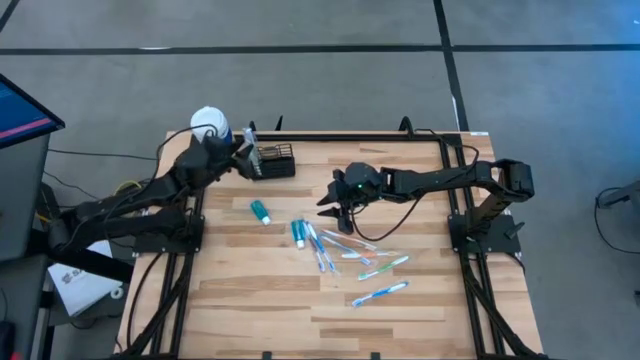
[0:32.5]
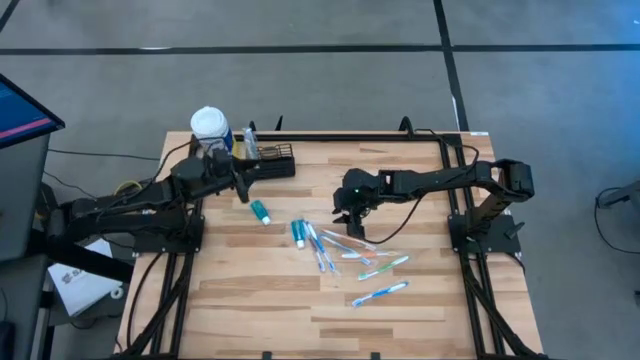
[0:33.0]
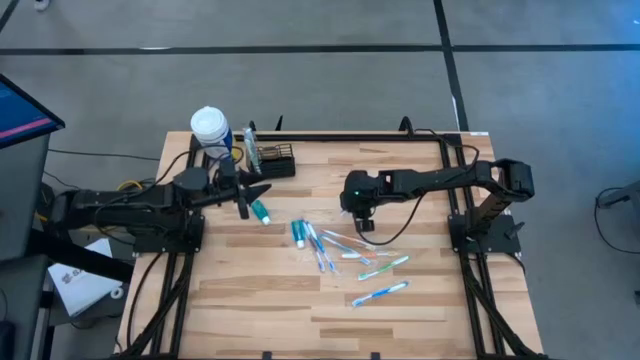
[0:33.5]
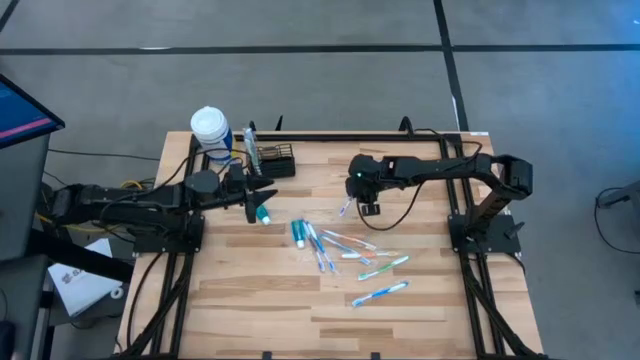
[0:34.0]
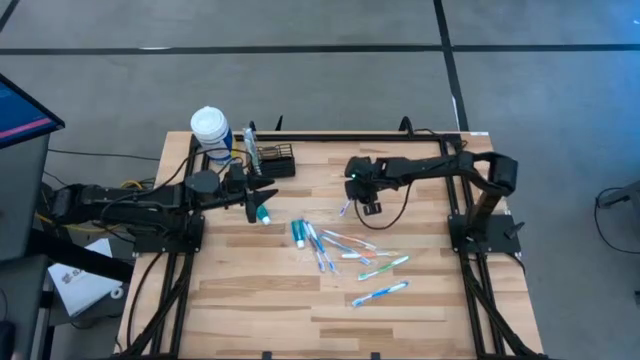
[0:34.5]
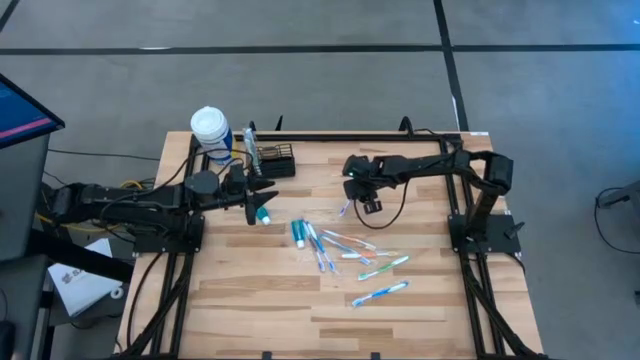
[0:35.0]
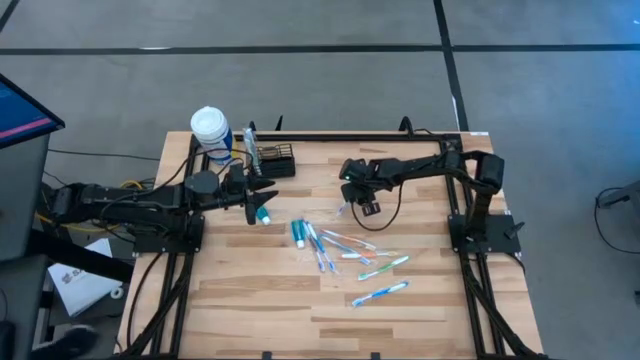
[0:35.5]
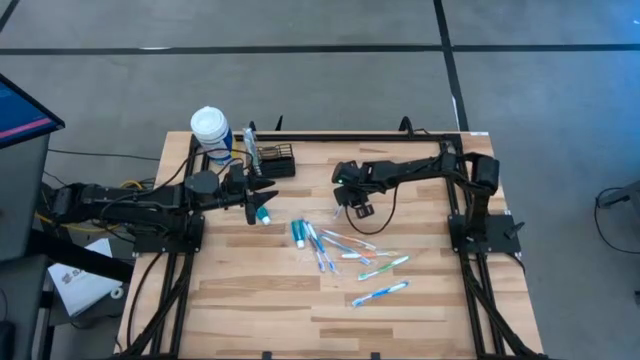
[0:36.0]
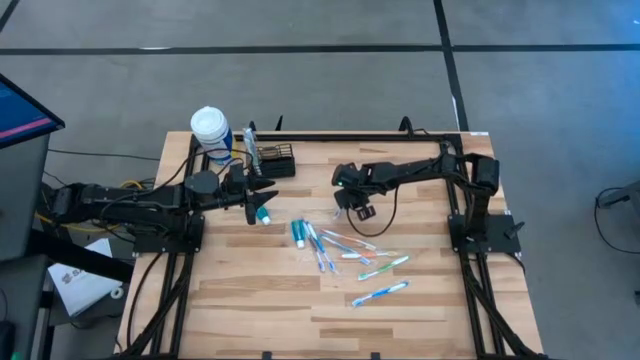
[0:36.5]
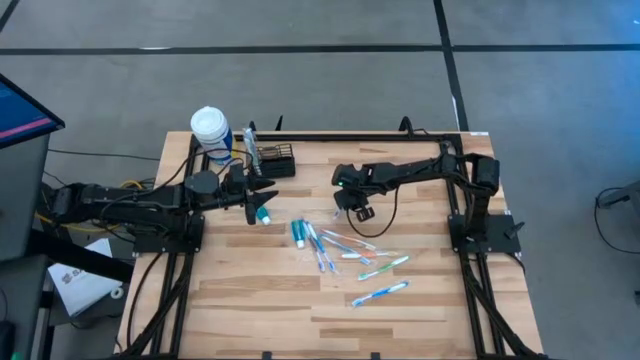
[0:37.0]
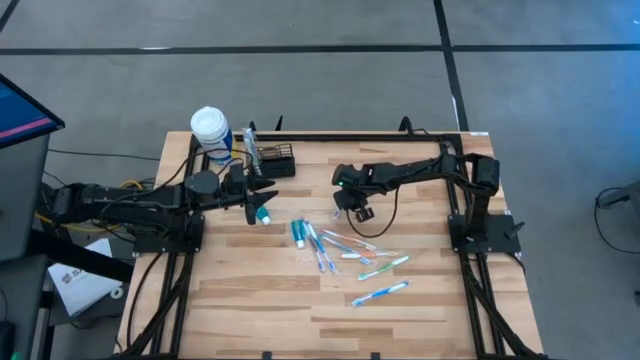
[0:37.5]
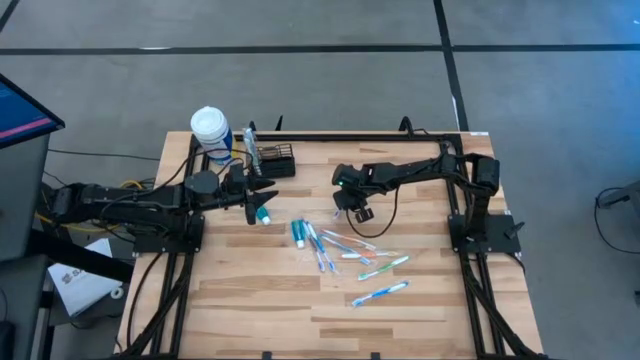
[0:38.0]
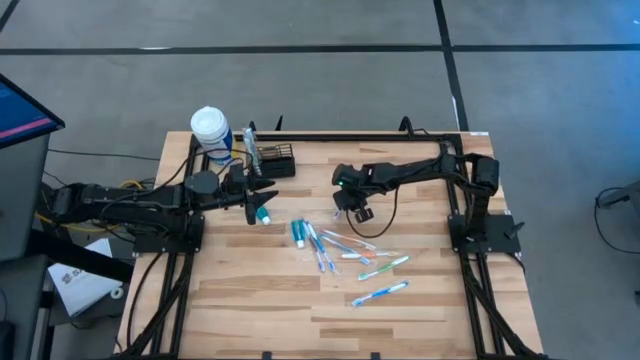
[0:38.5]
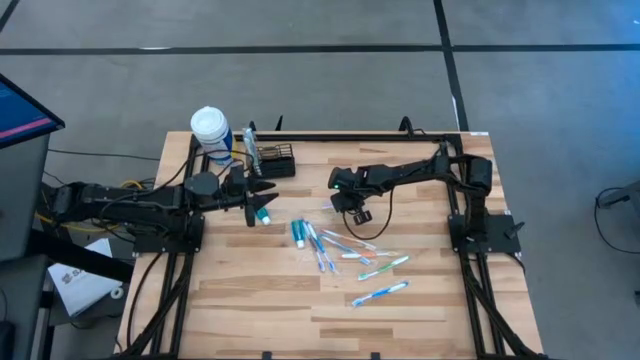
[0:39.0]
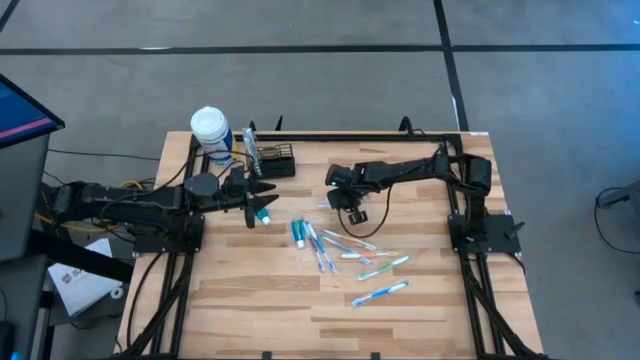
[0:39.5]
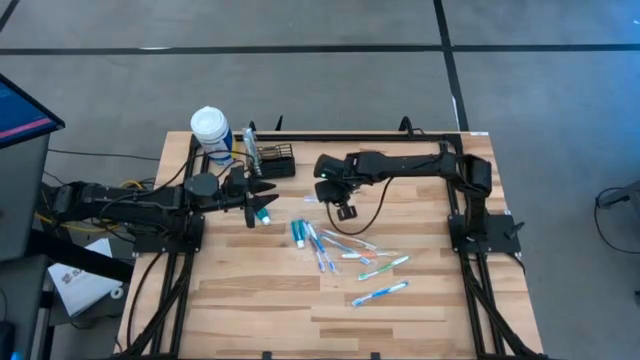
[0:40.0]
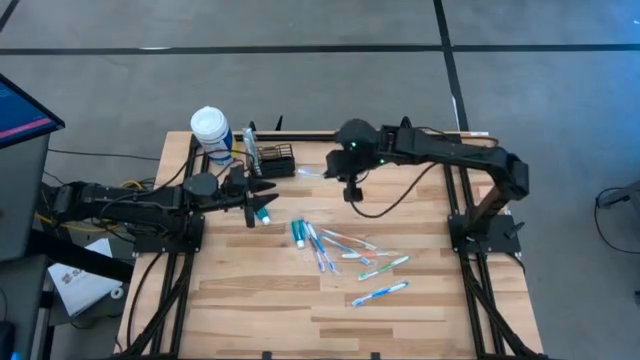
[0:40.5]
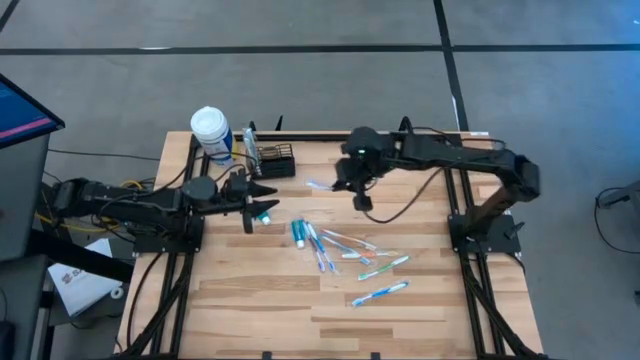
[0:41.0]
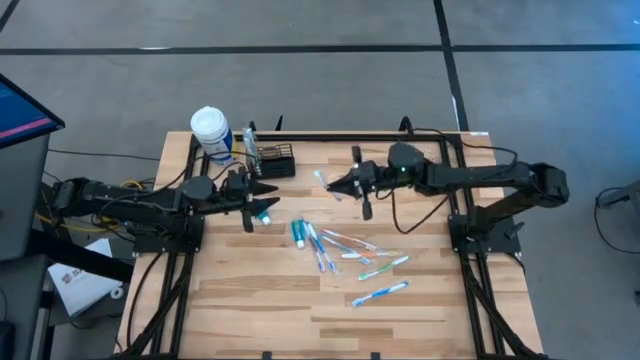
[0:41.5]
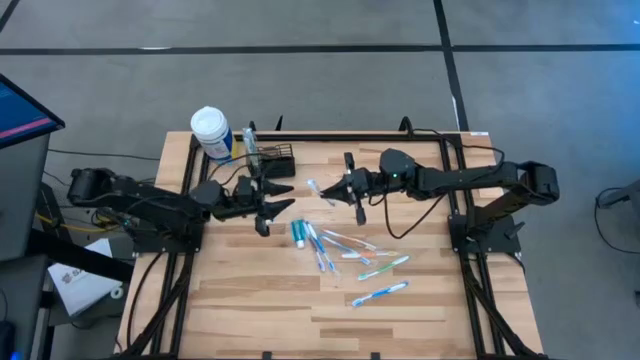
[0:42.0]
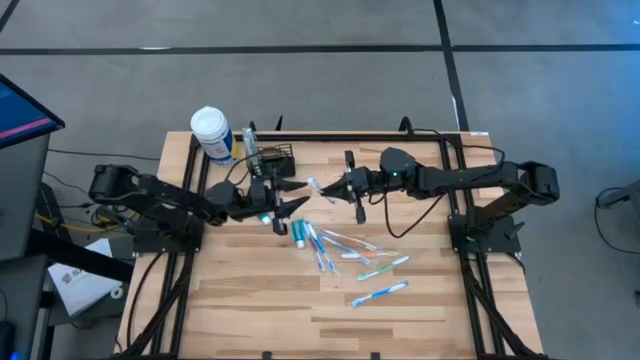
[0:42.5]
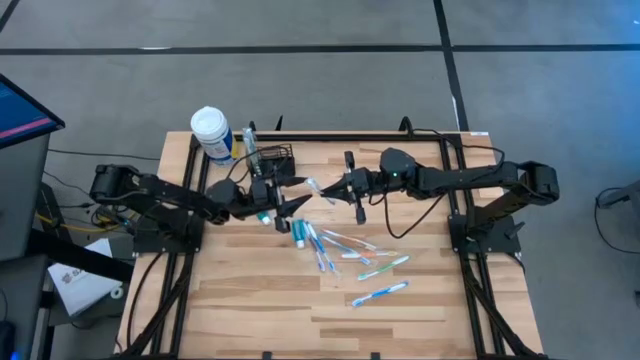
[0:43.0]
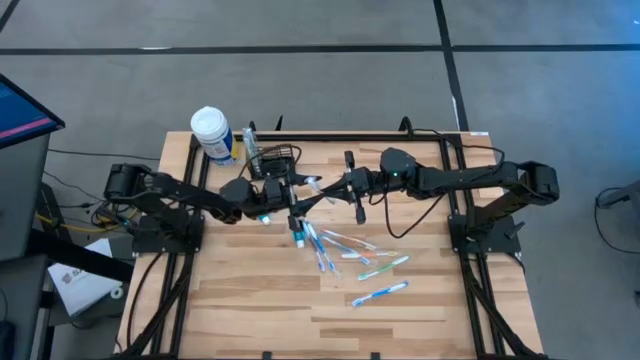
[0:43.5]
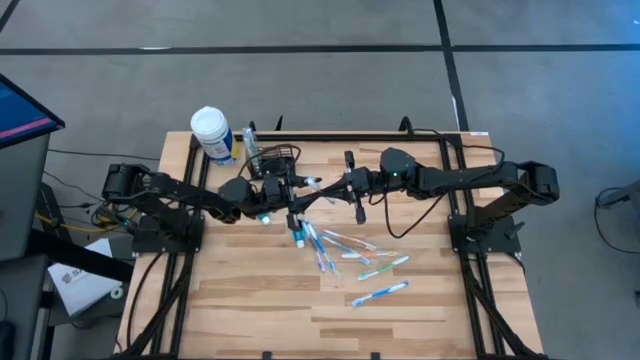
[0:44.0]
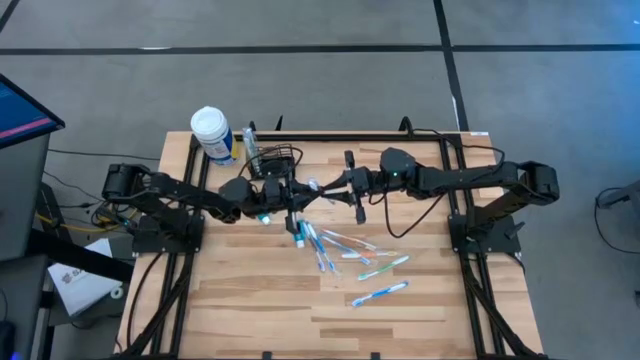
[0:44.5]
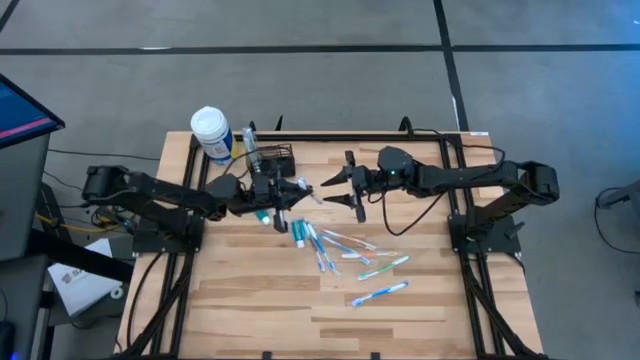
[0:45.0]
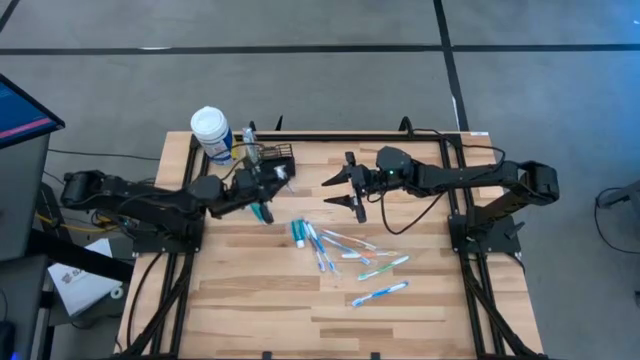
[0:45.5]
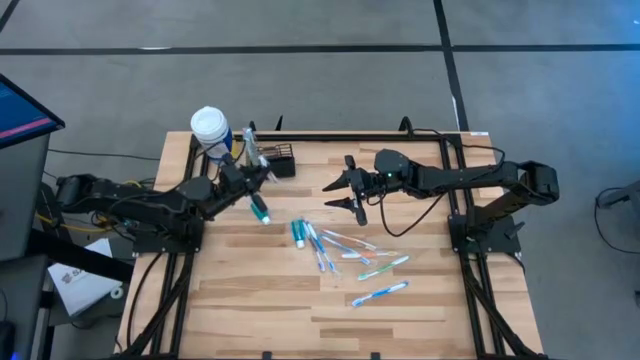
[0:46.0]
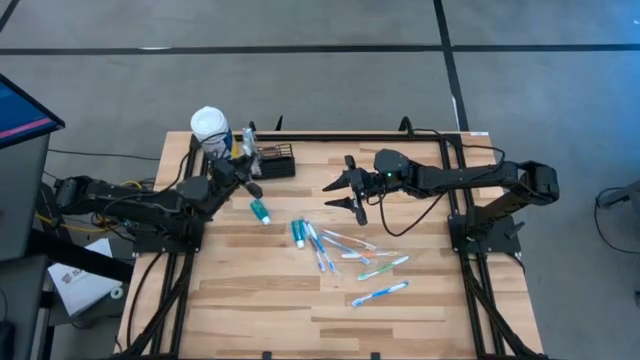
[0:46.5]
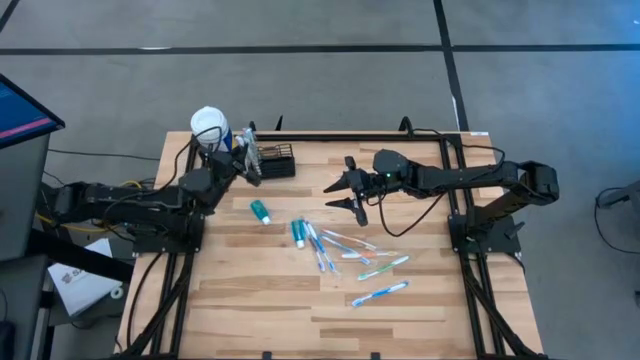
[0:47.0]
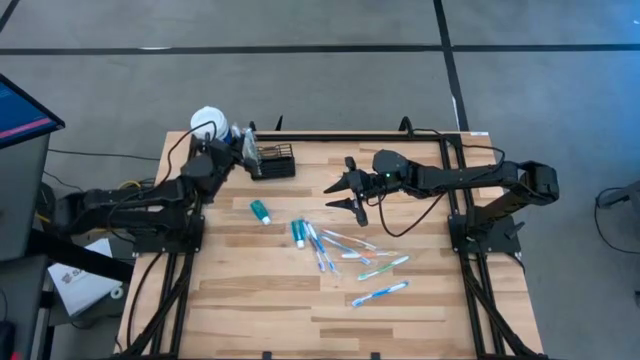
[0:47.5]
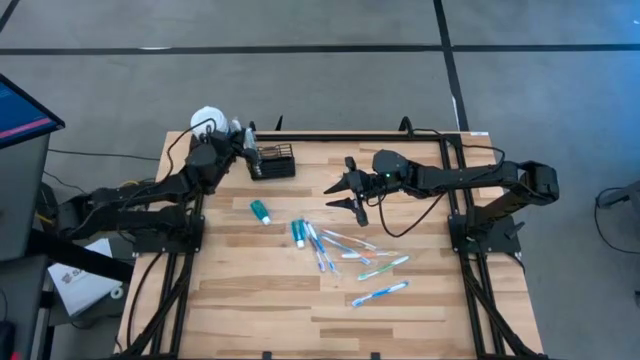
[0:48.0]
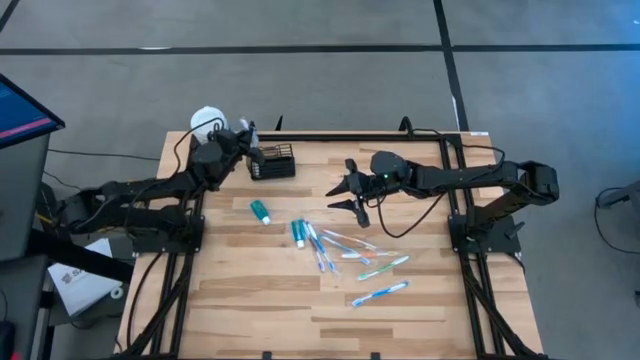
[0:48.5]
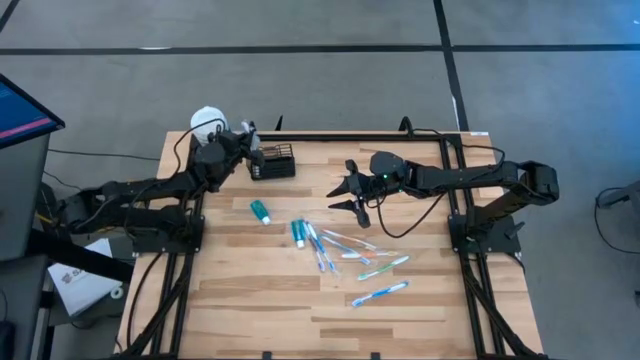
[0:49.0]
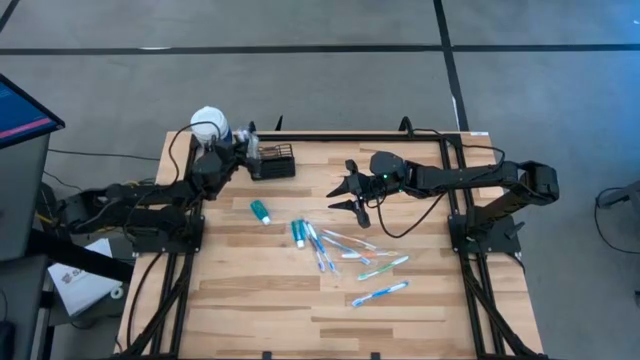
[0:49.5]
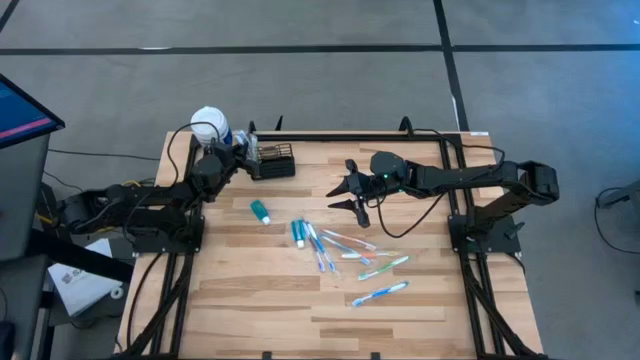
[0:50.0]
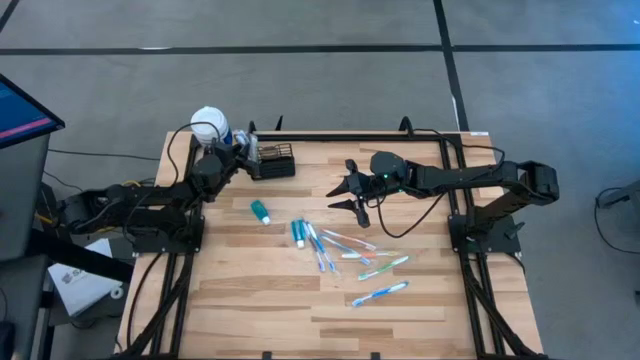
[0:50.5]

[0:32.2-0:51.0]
Task: Pick & Place toothbrushing station
Put the top purple toothbrush into the black wire organizer

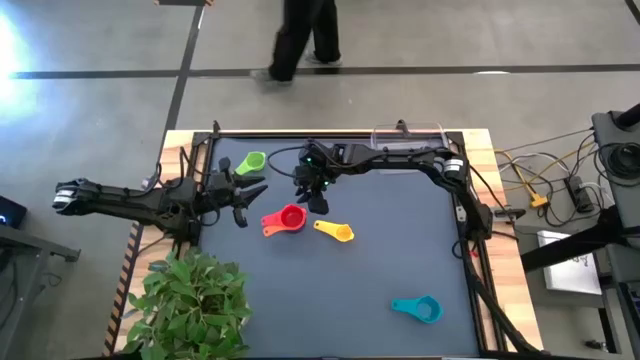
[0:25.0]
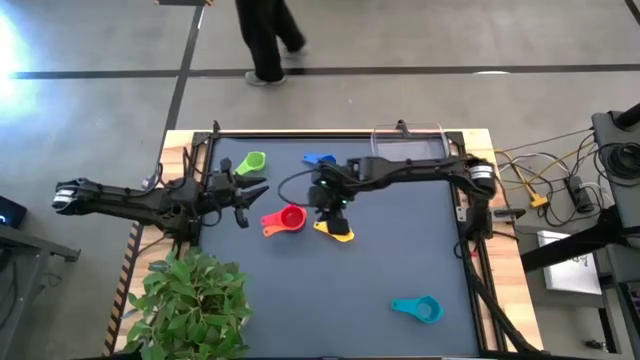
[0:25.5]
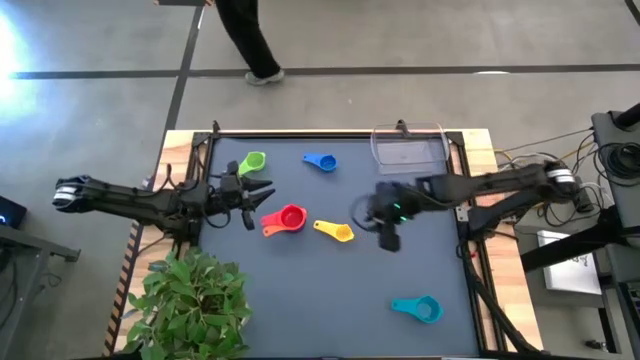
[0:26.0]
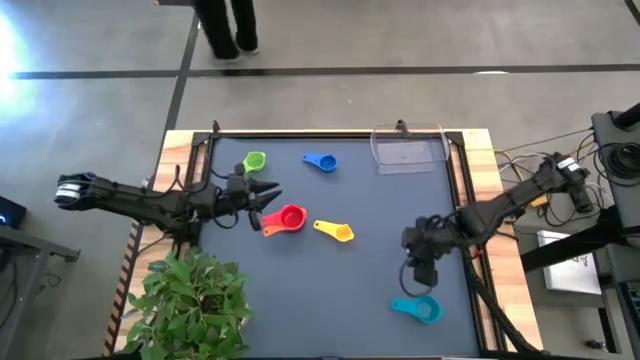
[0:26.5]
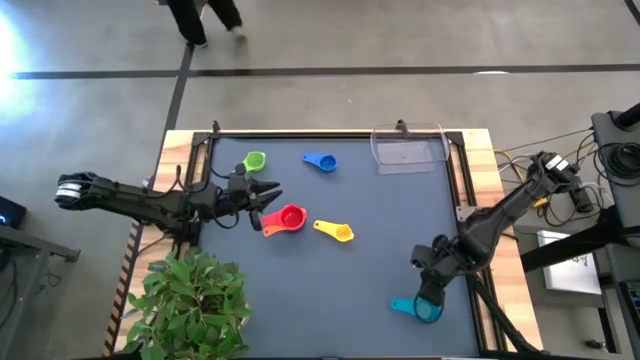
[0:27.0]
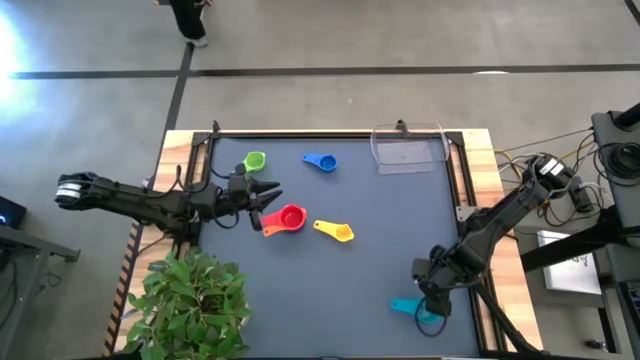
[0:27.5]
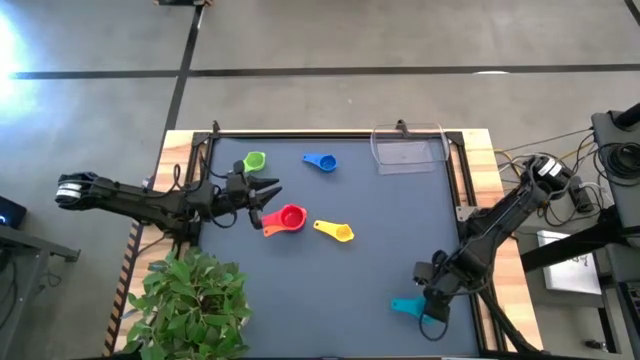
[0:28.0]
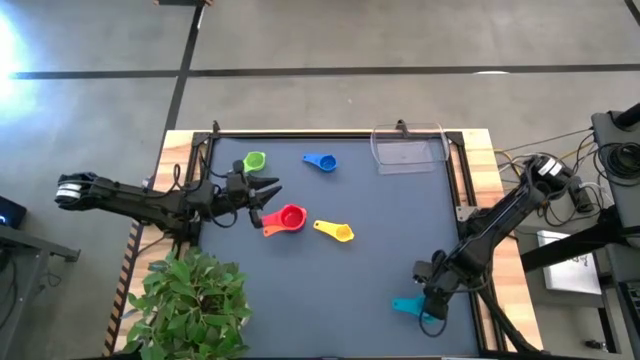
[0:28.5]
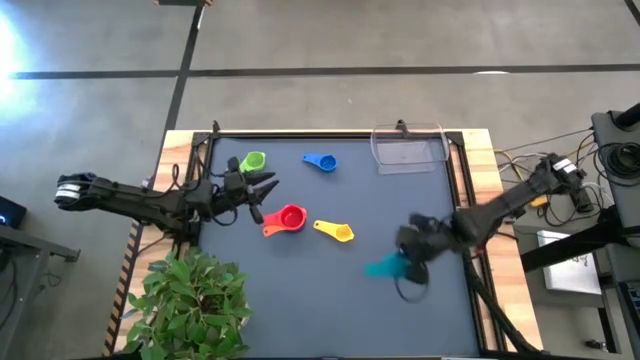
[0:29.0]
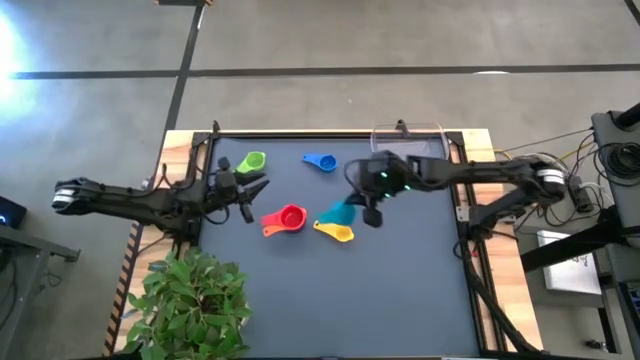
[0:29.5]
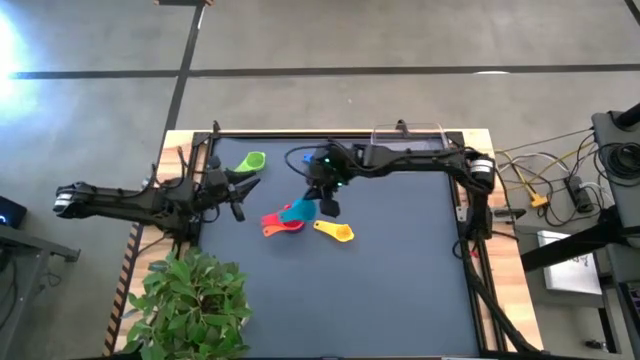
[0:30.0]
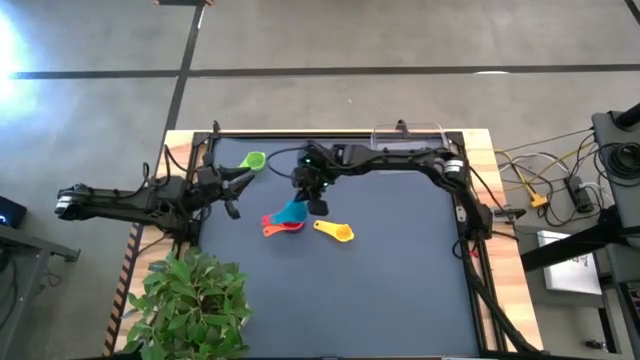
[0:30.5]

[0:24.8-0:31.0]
Task: Nest measuring cups in basket
Stack the light blue measuring cup on top of the red measuring cup
